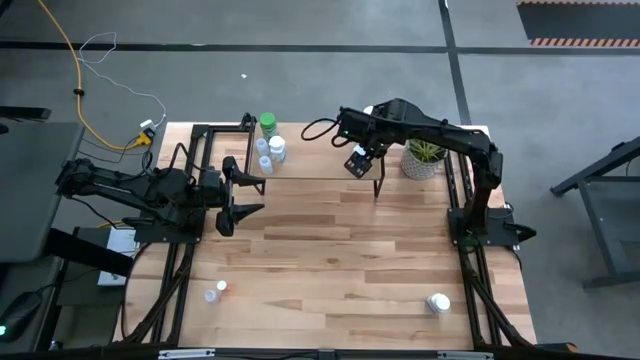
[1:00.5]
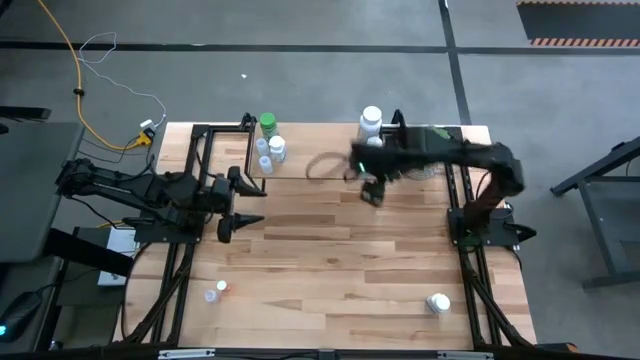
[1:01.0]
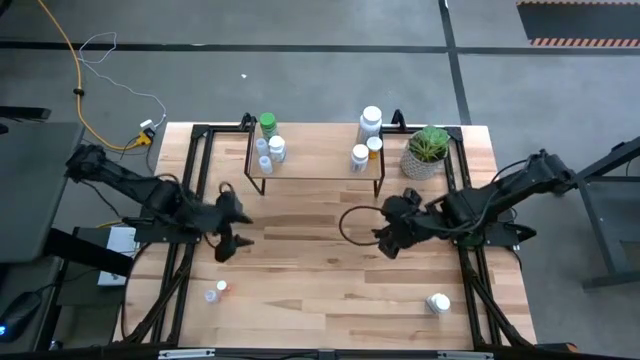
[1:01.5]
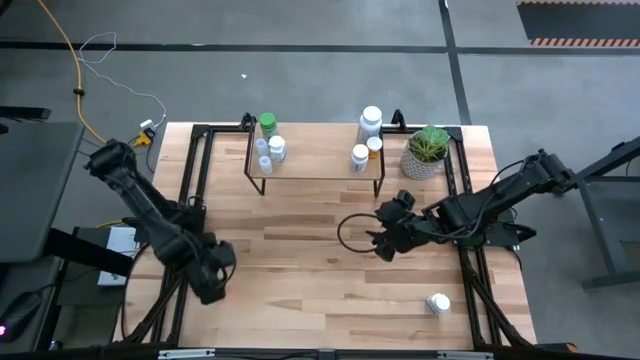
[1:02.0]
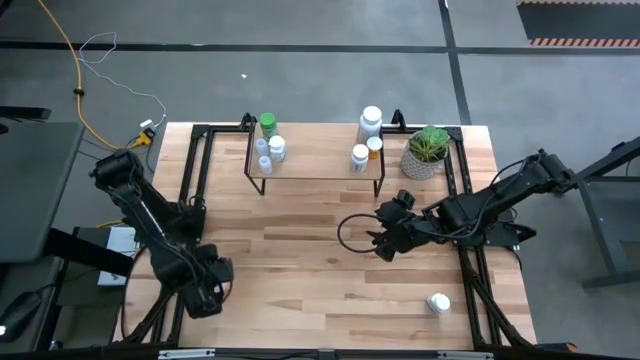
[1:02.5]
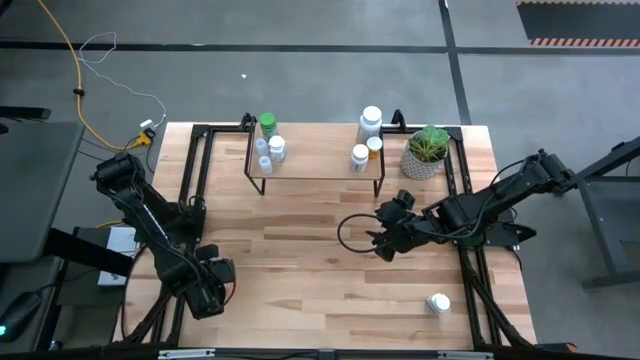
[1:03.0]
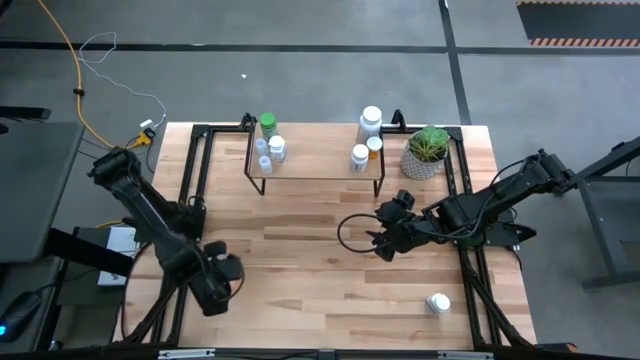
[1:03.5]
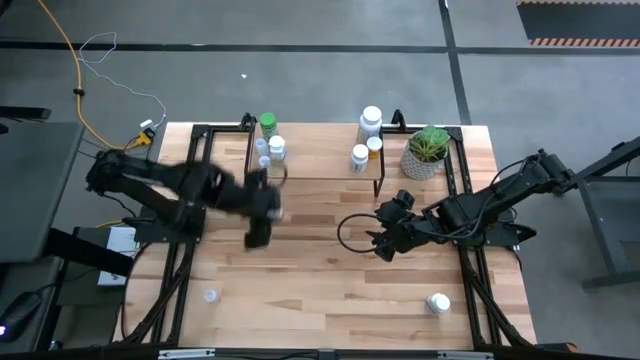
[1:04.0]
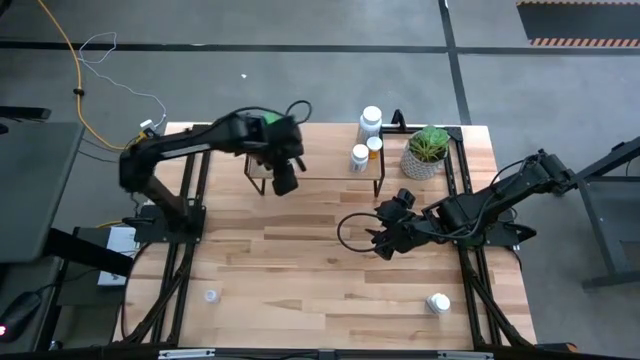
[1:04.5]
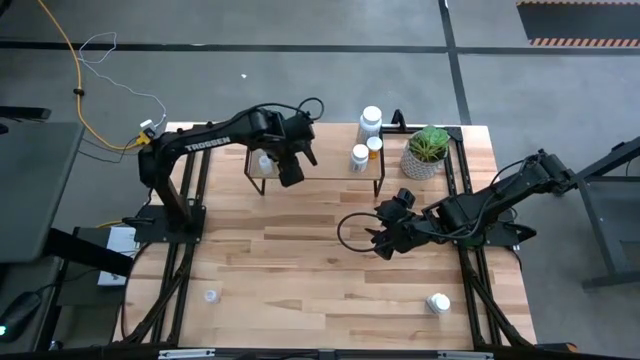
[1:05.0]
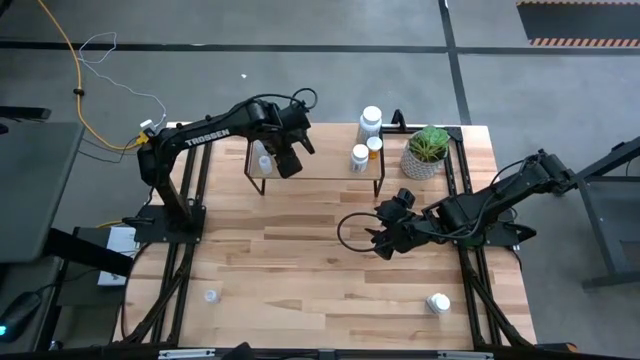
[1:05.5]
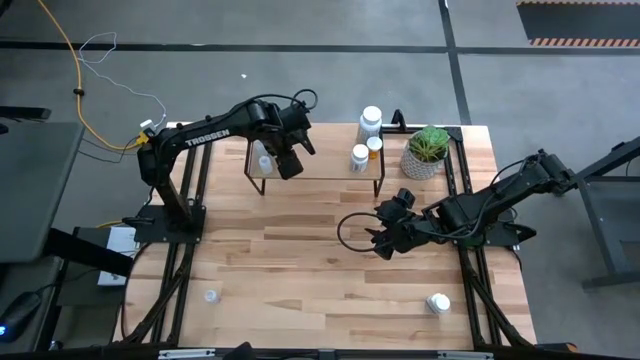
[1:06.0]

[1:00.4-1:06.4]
Task: Pick and place medicine bottles onto shelf by color
Put the red bottle on the shelf

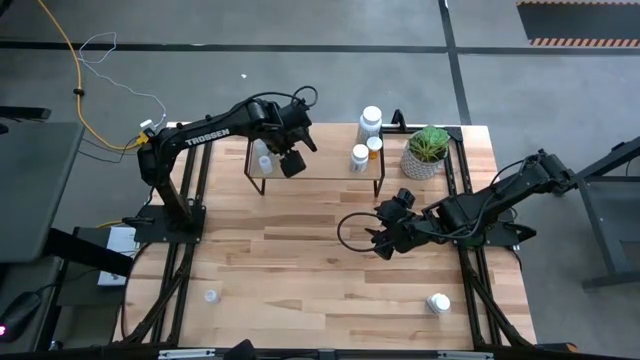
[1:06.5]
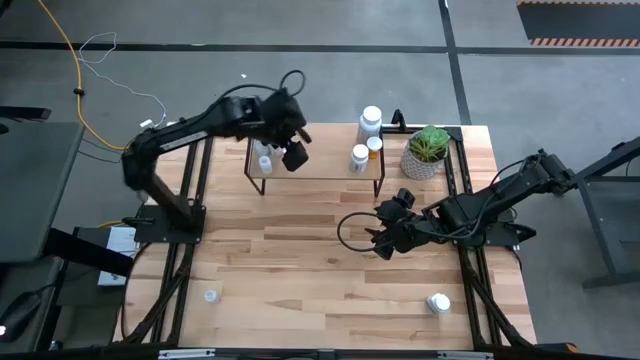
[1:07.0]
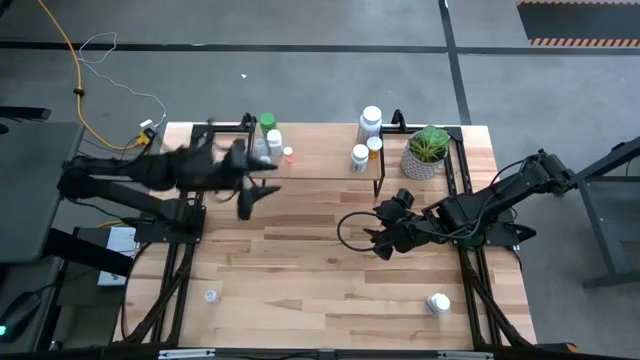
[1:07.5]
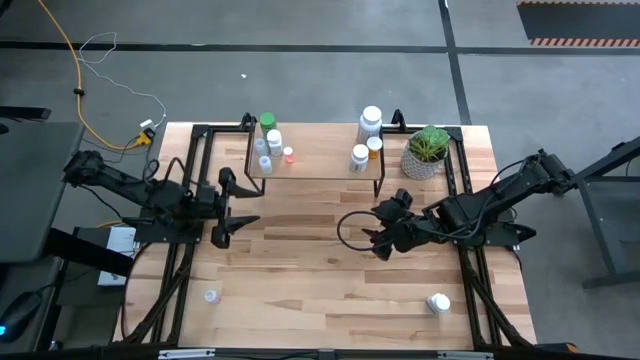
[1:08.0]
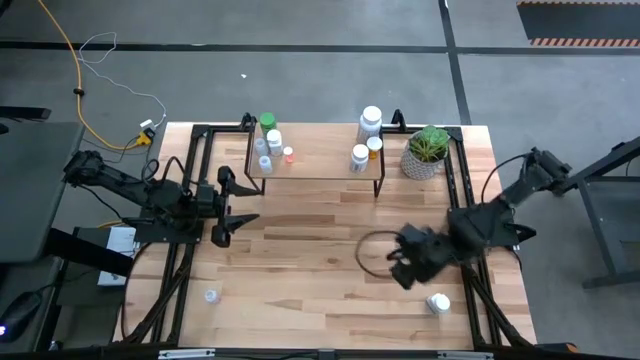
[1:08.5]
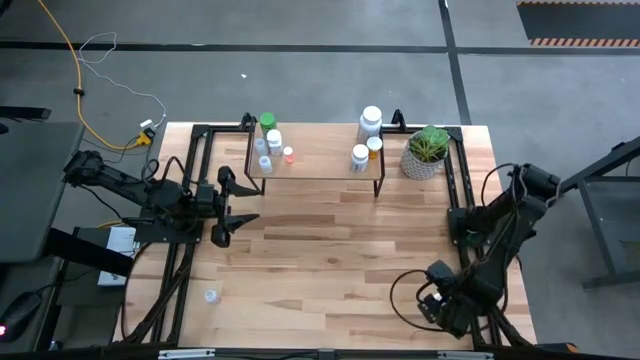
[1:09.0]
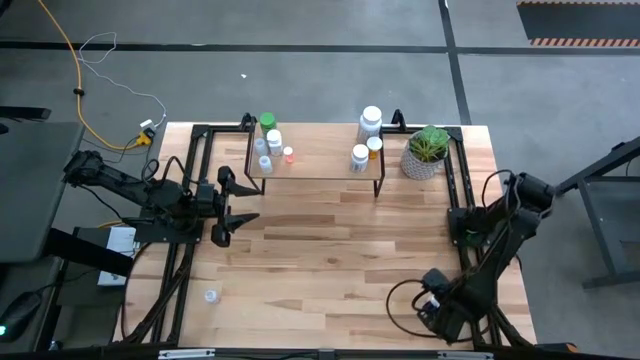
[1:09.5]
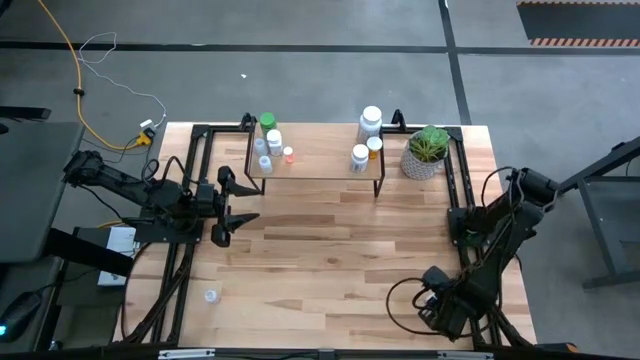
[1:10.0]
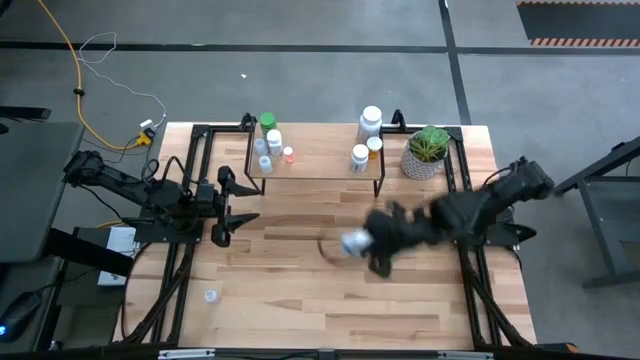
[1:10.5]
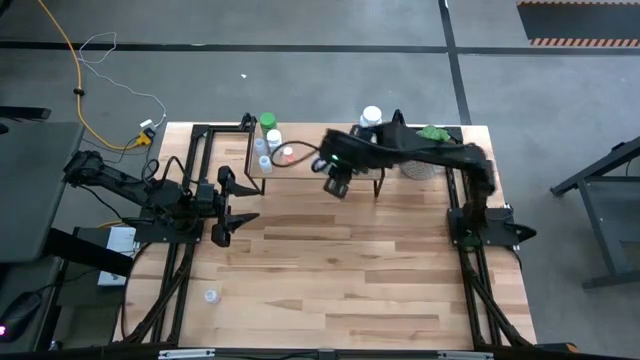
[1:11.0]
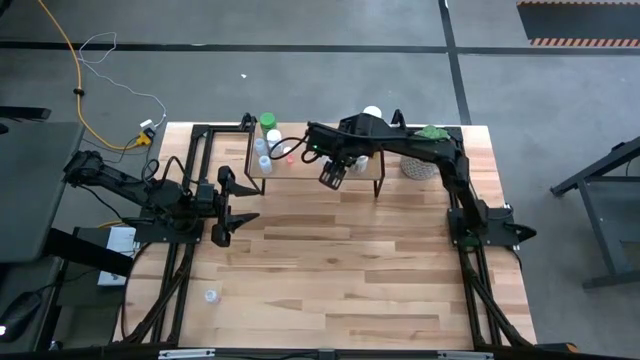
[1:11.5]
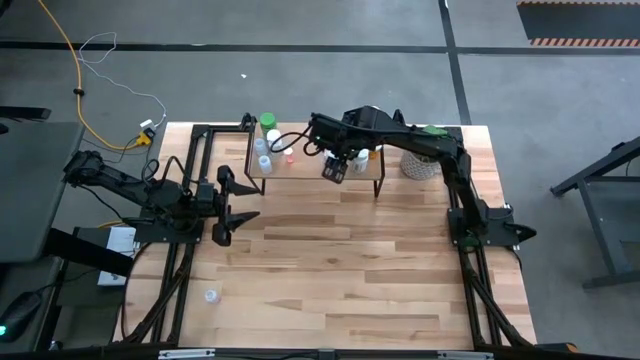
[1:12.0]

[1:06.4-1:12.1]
Put the white and blue bottle on the shelf

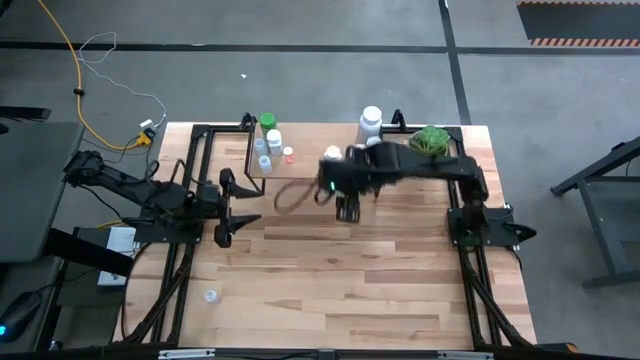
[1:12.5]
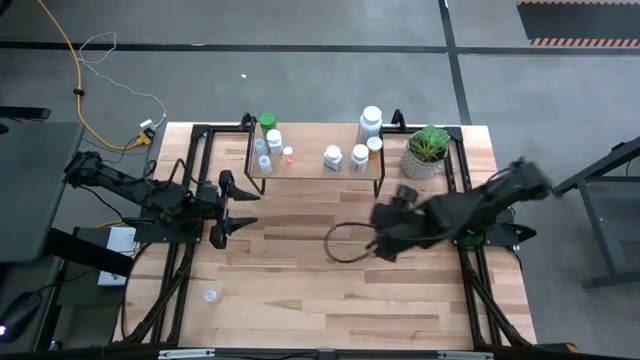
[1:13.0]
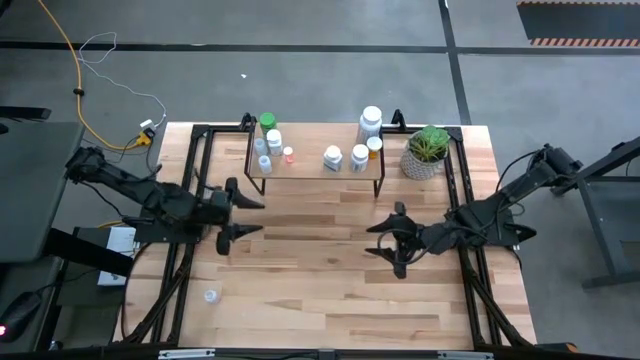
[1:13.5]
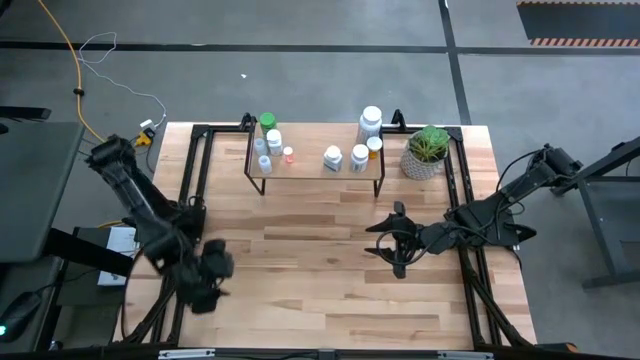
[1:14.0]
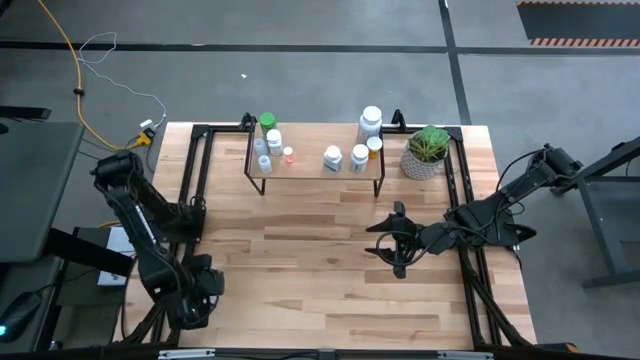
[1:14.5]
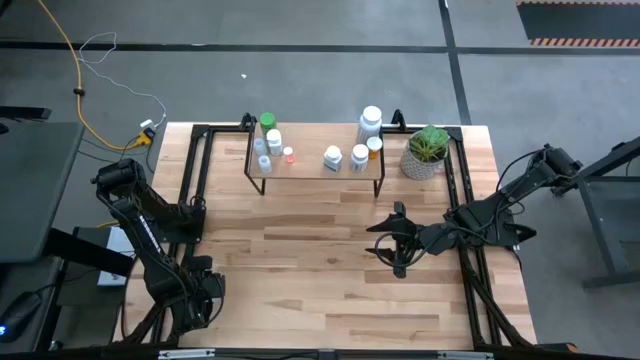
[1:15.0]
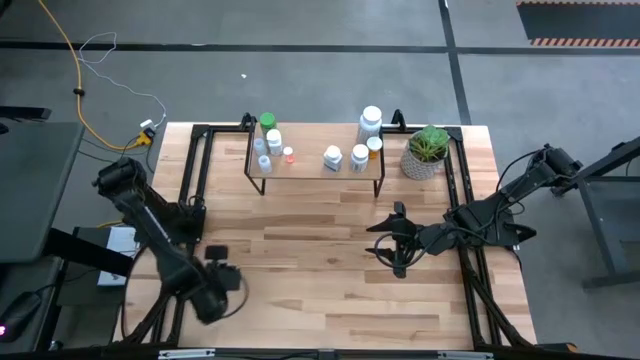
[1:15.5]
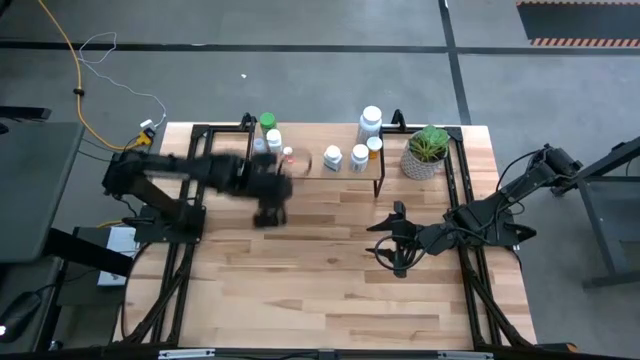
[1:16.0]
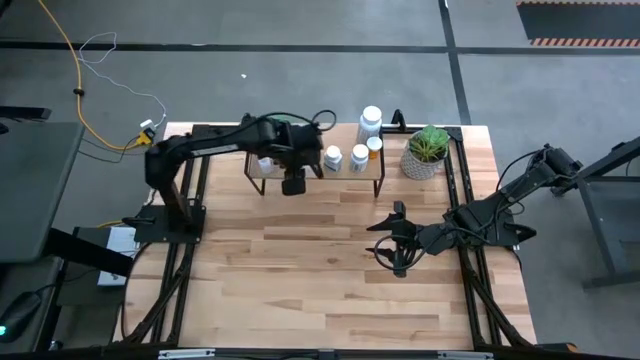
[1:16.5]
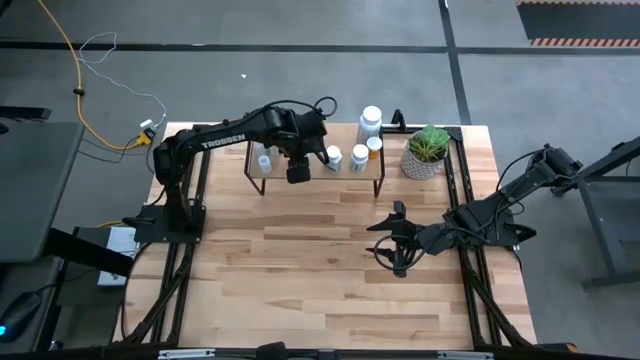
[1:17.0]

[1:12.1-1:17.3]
Put the transparent bottle on the shelf

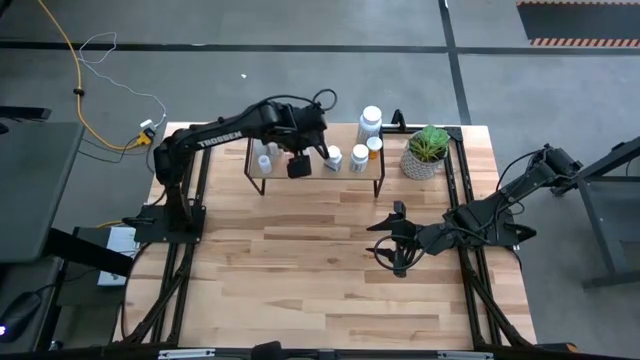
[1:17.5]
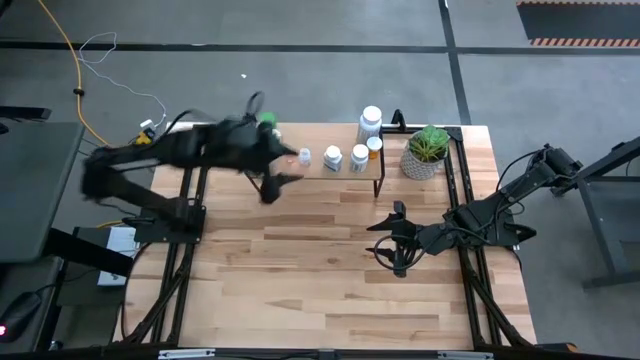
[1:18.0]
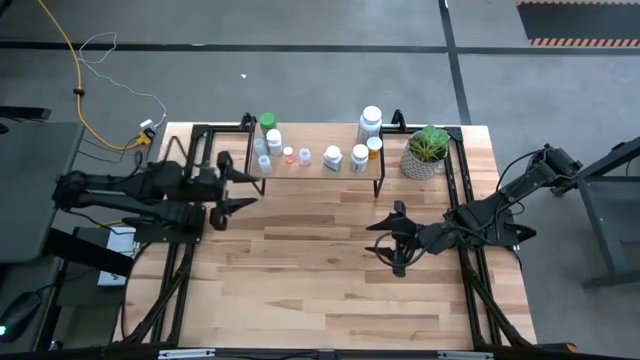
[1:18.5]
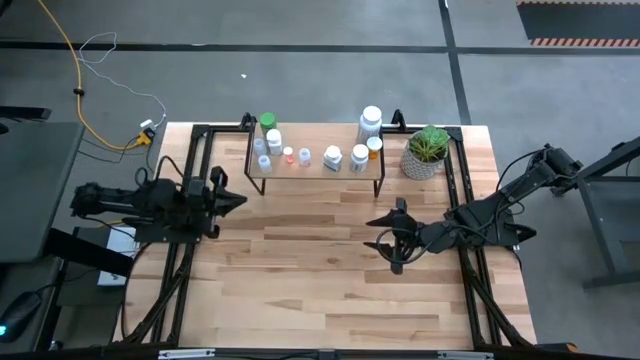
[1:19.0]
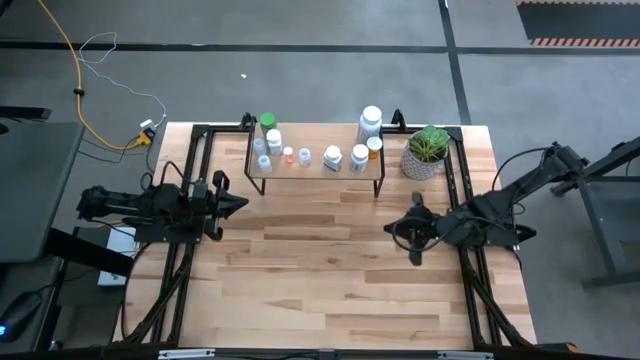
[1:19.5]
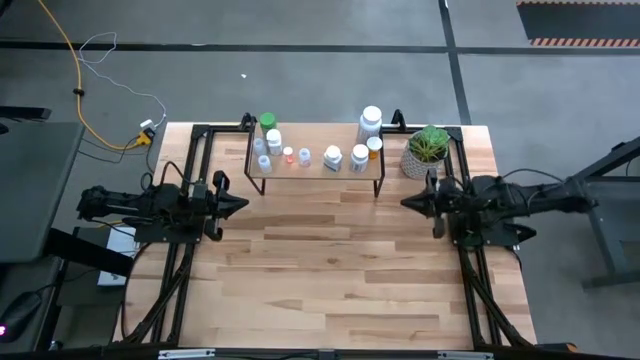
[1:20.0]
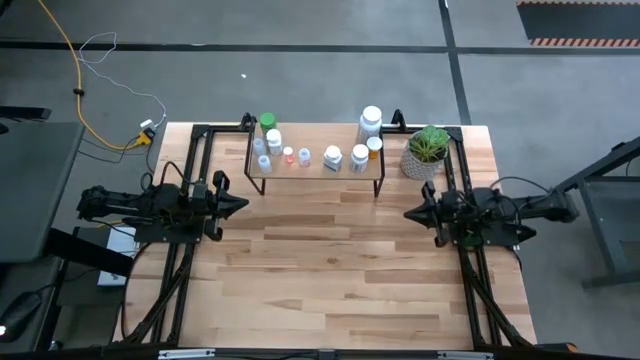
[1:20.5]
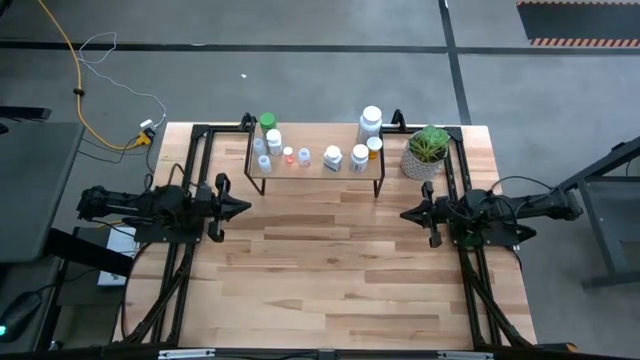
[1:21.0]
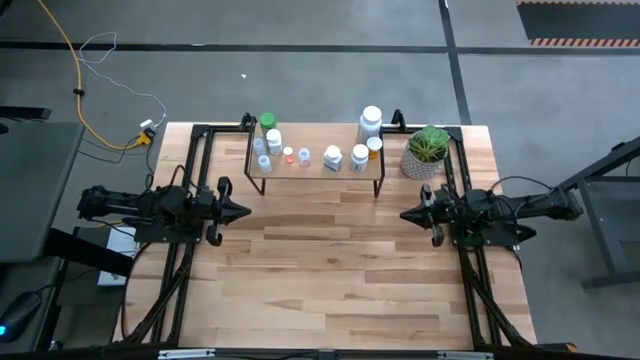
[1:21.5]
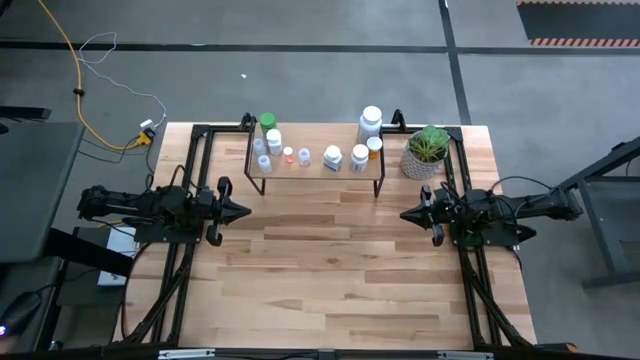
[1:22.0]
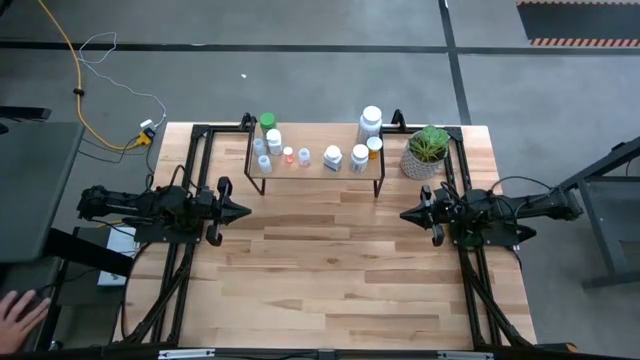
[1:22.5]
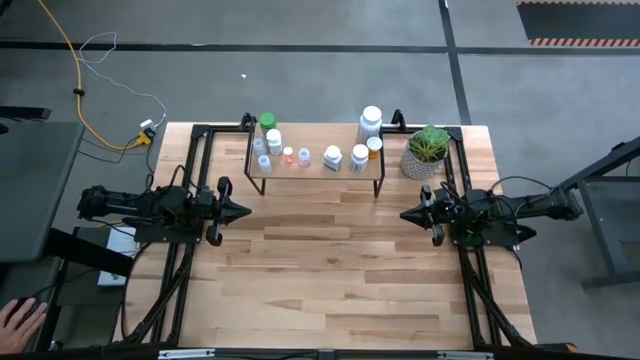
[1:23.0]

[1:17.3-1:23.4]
Return to Home Position
